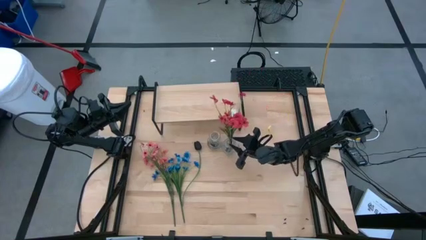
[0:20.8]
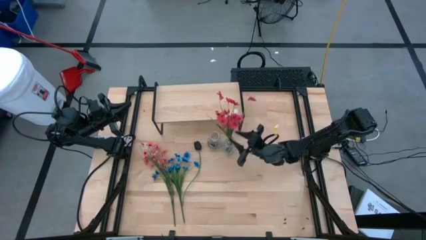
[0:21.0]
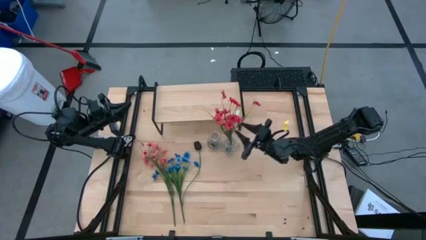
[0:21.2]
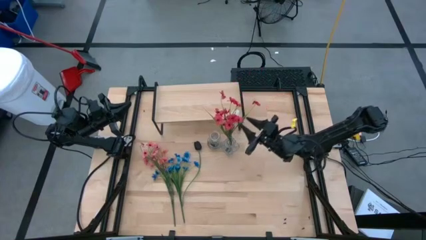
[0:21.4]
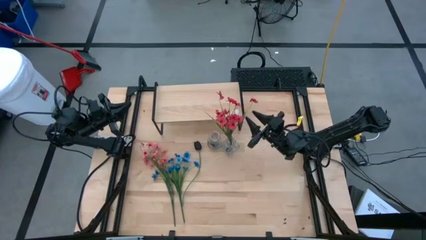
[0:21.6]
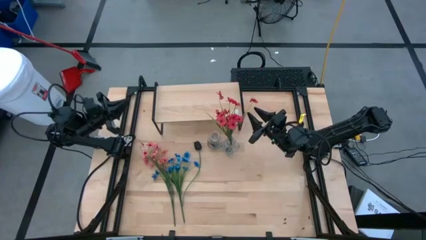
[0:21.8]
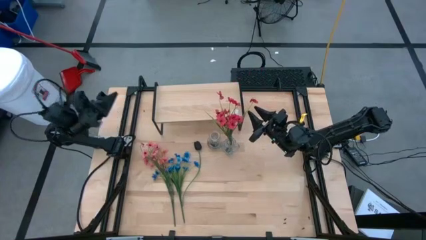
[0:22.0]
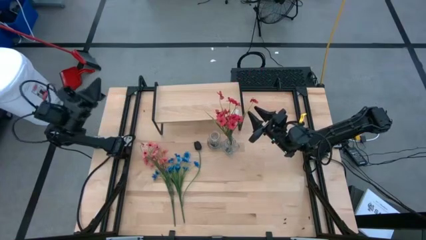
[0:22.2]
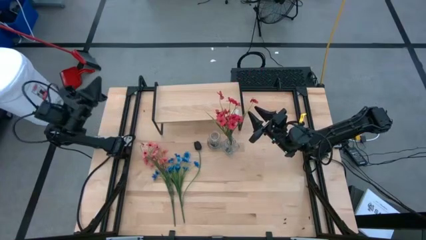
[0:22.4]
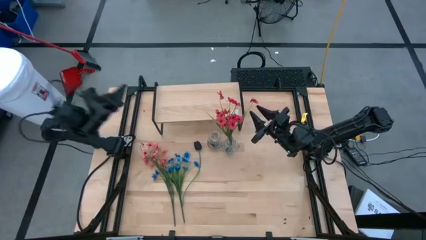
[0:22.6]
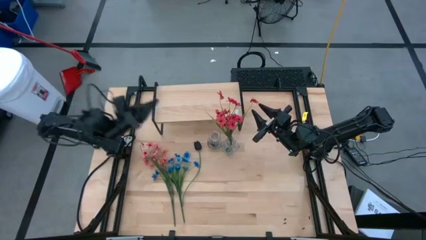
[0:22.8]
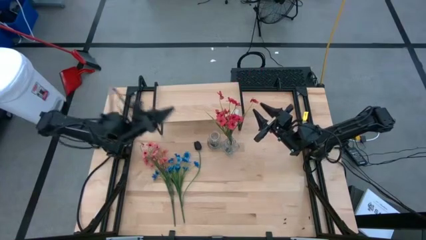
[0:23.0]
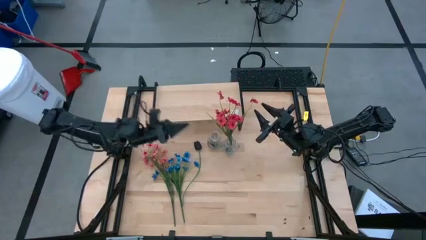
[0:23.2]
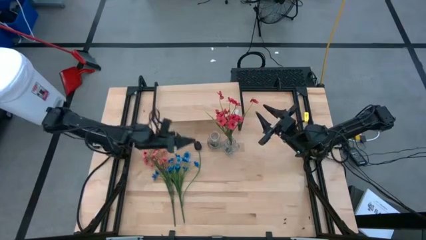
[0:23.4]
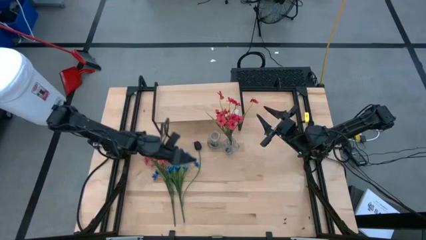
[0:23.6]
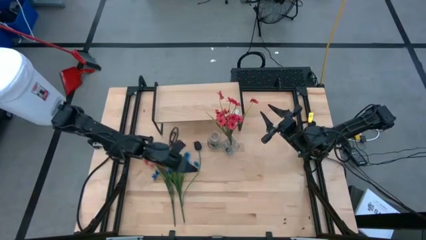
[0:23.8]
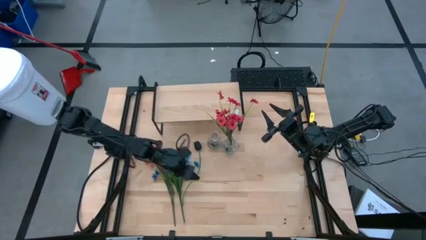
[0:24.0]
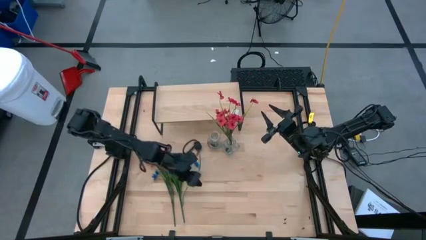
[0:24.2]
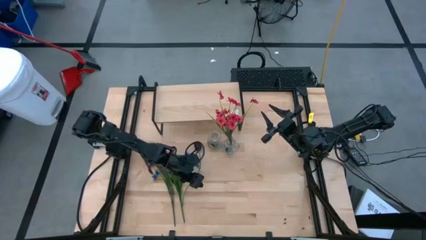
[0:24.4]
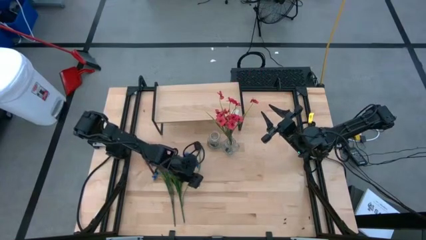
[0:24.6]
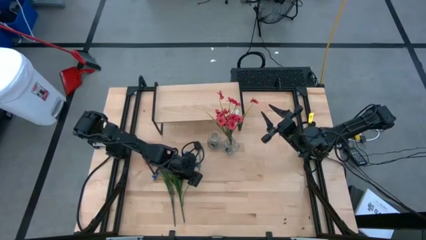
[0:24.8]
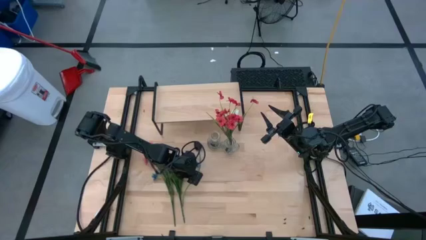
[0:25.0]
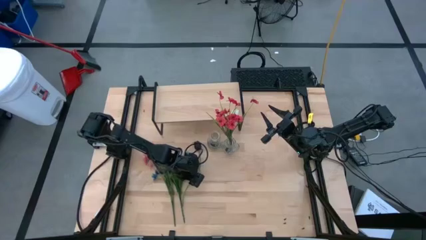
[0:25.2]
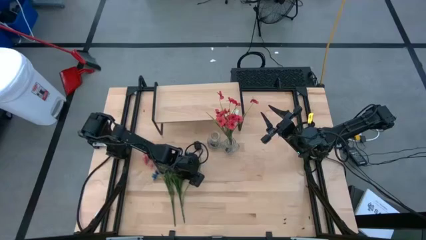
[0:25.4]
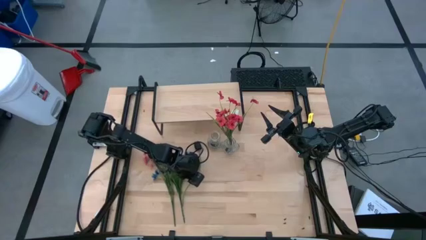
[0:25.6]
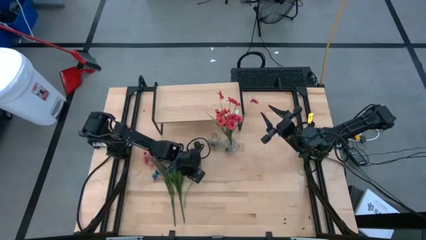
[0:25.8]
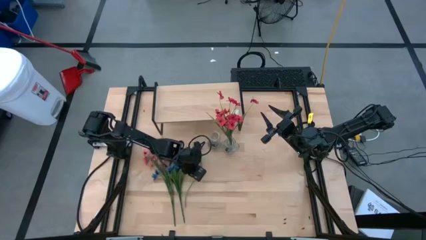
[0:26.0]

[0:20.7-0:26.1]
Task: Pick and place flowers into a vace then onto a shelf
Put the black flower into the left transparent vase

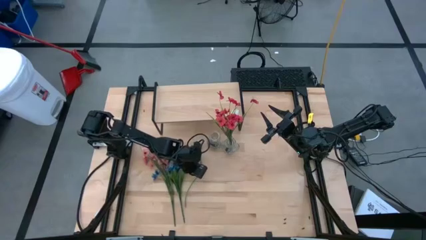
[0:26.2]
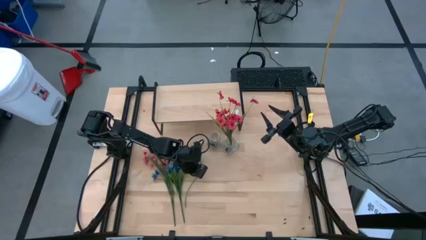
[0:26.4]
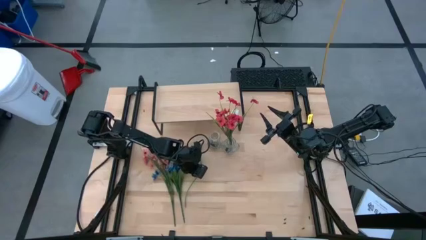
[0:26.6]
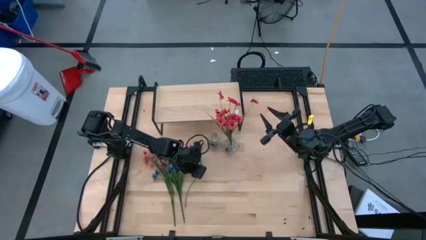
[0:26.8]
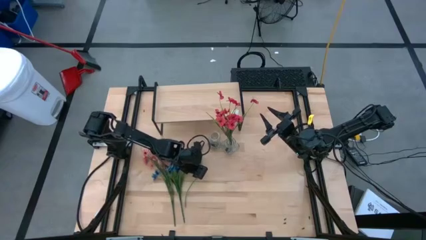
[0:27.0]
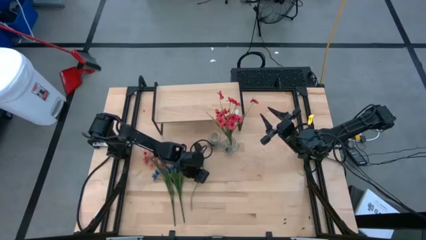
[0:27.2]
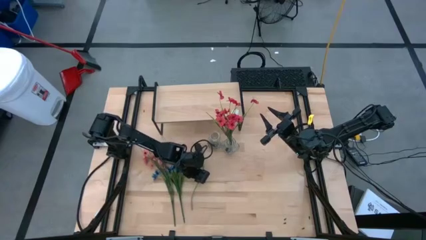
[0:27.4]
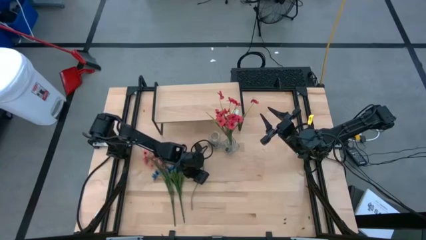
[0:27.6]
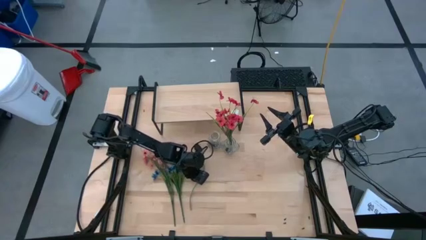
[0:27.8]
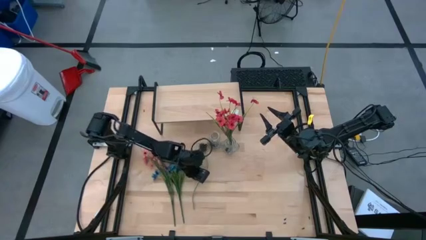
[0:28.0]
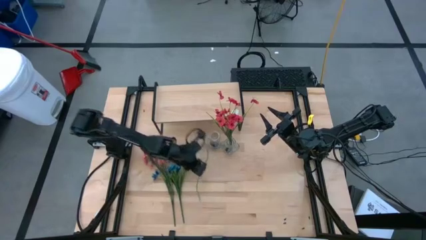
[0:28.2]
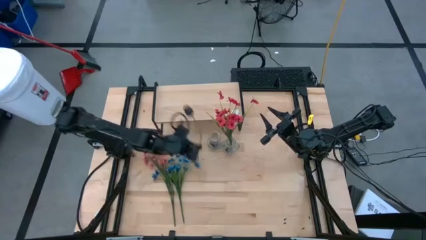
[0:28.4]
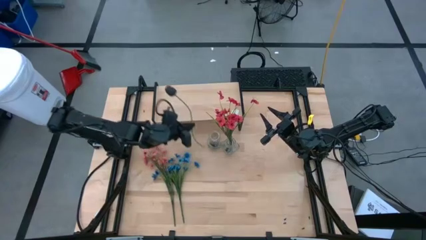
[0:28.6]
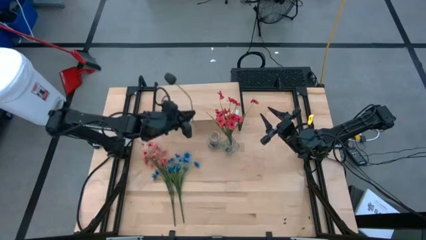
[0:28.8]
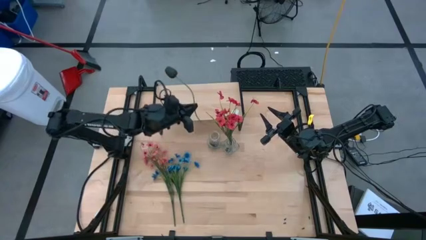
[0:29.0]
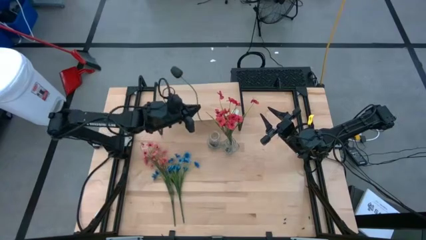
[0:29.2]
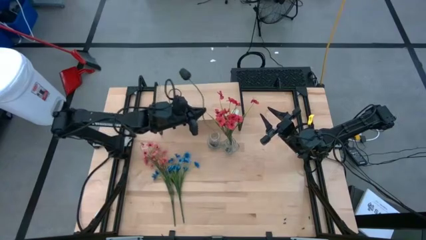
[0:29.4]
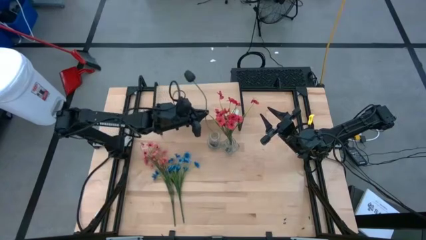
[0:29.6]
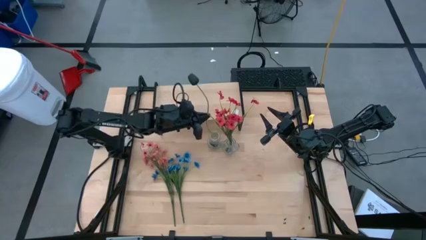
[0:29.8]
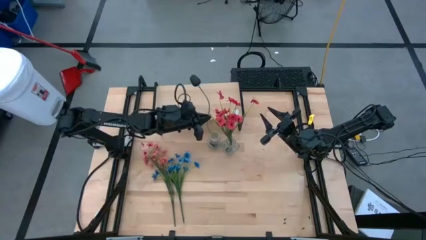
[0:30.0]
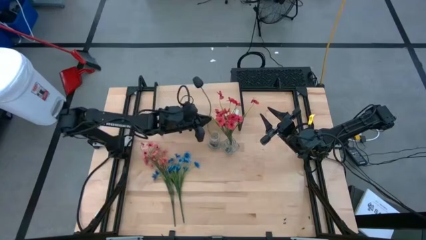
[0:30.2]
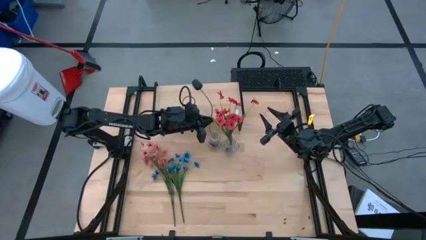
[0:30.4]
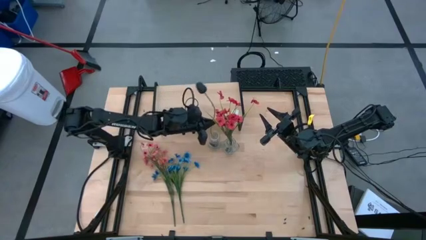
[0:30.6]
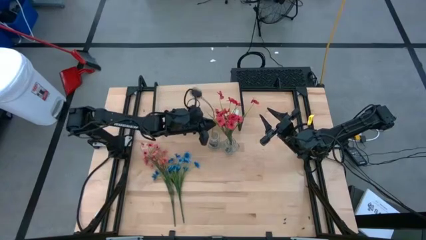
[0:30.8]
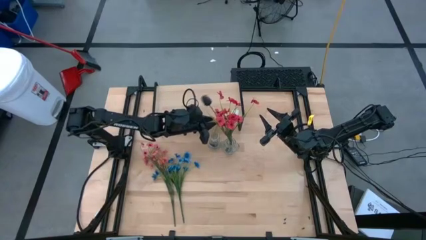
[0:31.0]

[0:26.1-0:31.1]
Put the black flower into the left transparent vase

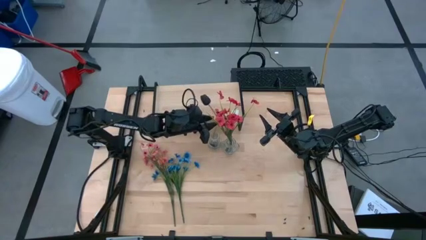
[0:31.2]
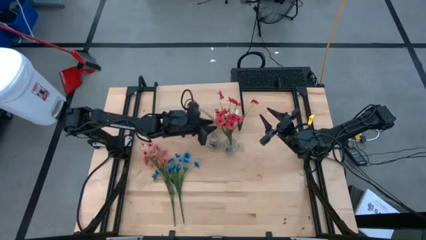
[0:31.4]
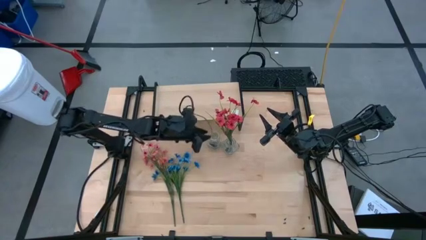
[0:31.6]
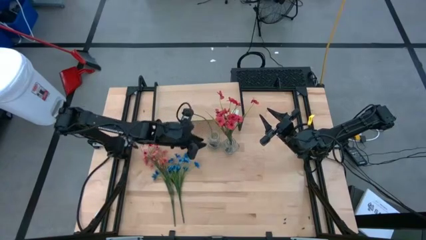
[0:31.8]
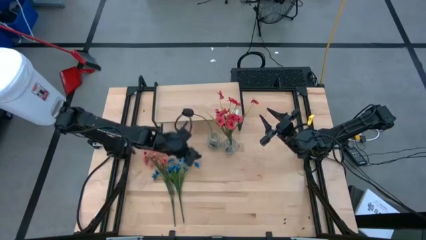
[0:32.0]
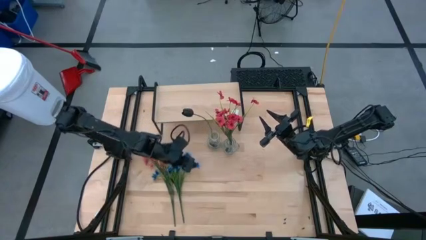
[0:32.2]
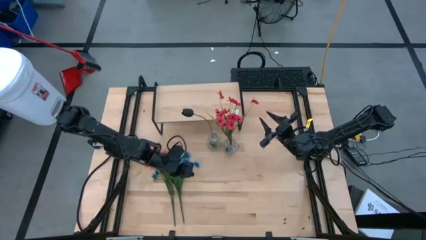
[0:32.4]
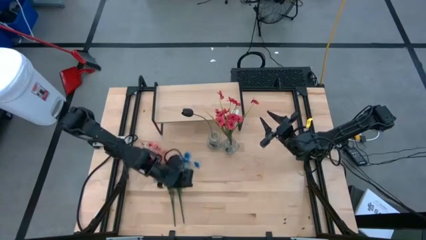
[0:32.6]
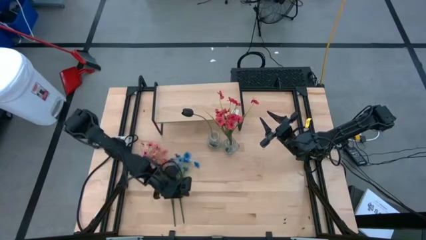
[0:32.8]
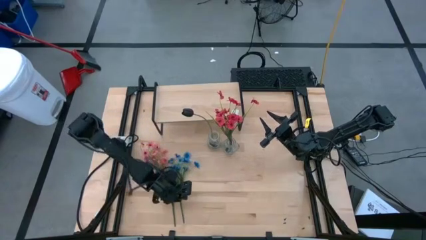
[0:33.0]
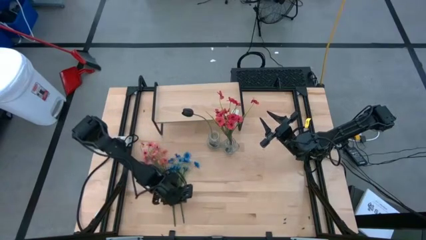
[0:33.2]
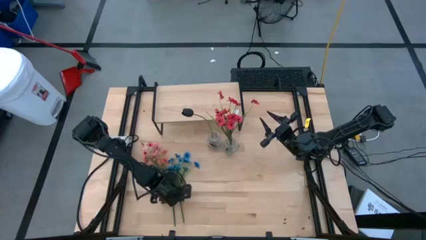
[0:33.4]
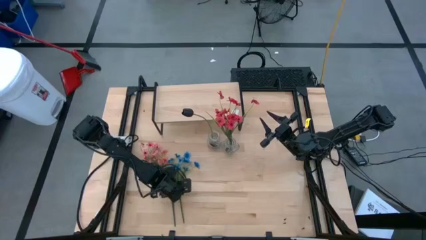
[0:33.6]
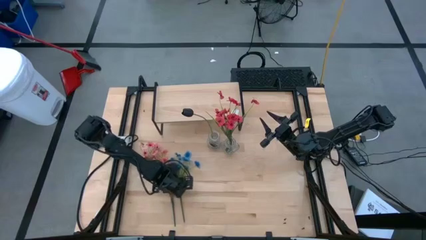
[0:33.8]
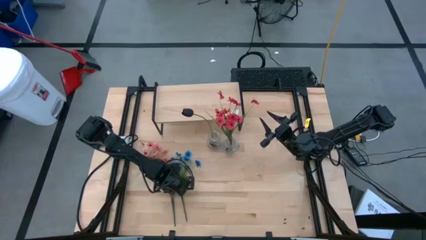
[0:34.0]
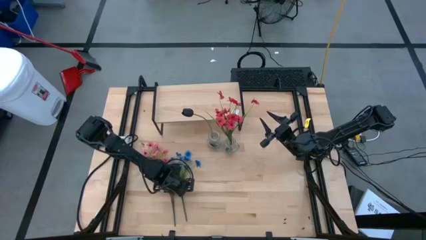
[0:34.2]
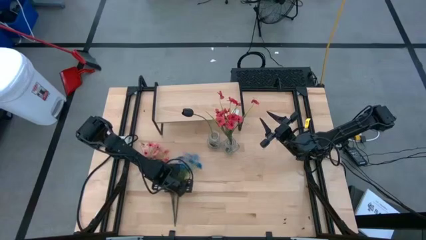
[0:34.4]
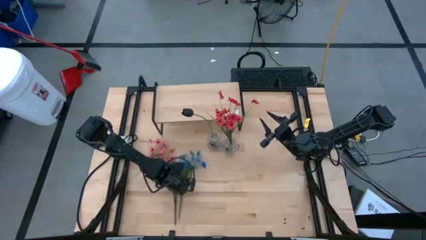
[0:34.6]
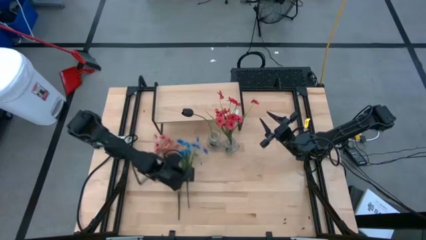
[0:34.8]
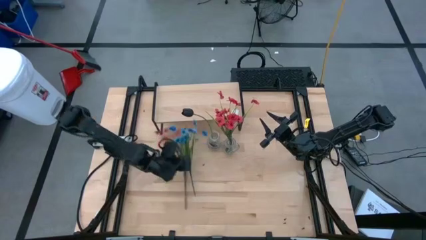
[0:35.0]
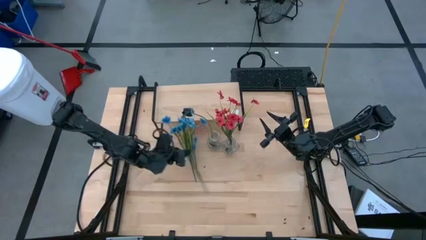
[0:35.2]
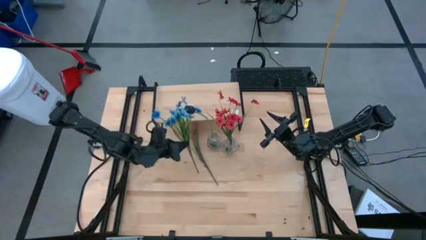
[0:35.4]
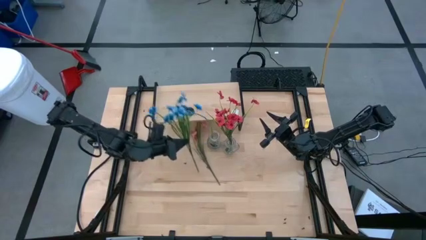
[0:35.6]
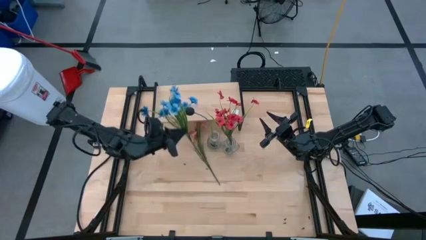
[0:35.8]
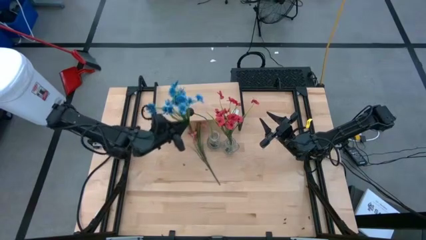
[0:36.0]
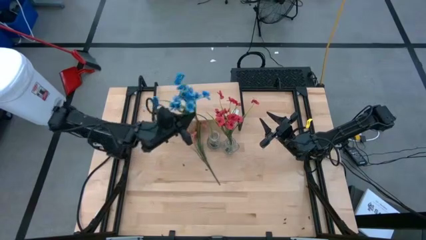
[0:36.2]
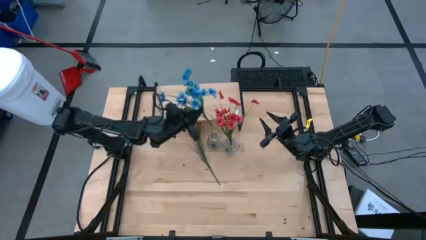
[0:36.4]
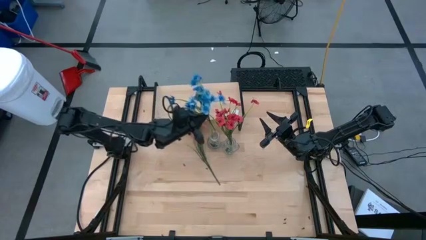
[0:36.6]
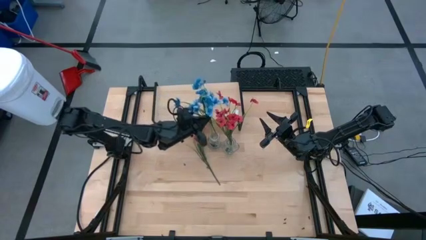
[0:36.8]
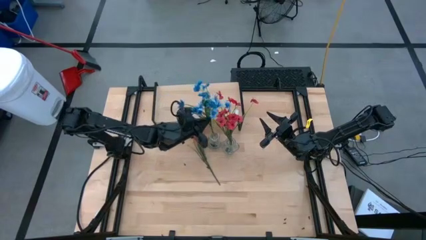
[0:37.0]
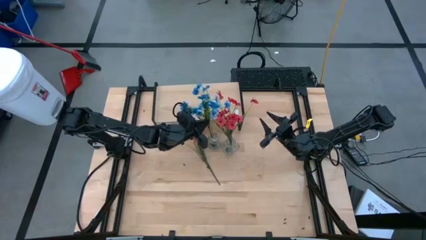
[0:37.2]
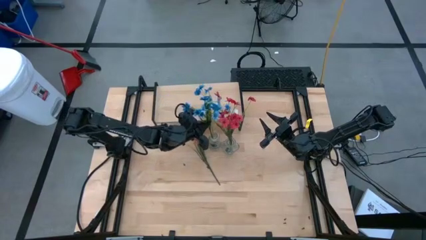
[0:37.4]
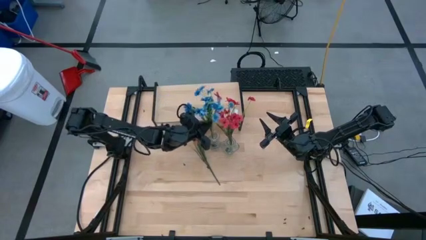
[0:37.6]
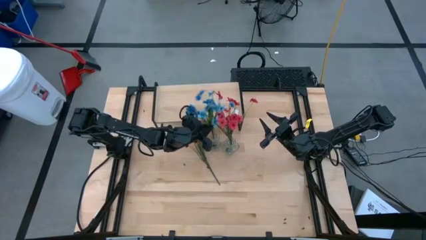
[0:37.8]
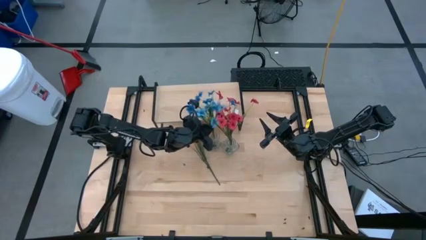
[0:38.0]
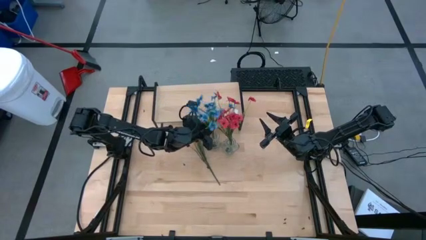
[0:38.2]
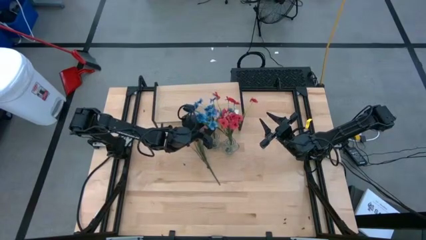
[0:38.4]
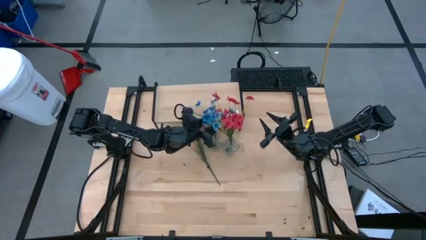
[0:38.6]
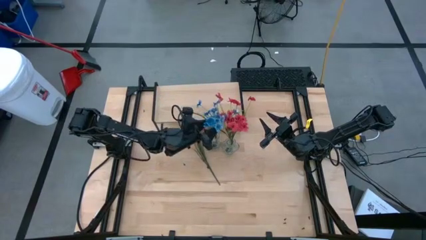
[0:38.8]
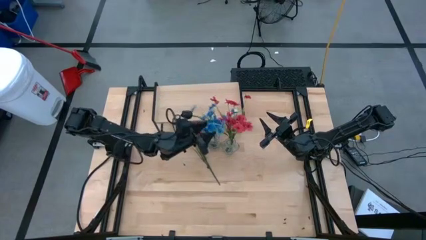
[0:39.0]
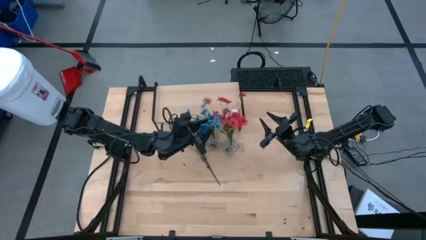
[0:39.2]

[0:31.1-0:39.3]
Put the blue flowers into the left transparent vase
